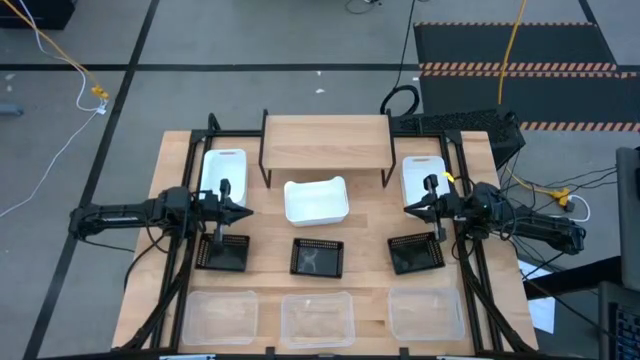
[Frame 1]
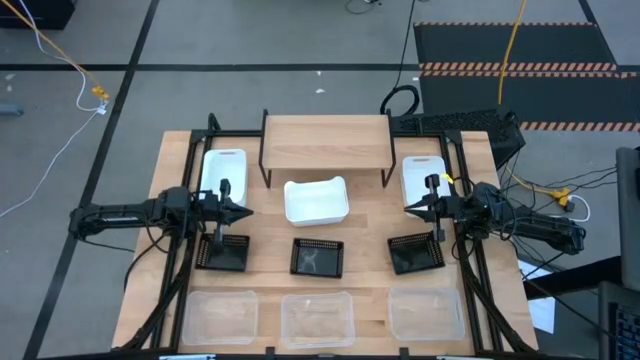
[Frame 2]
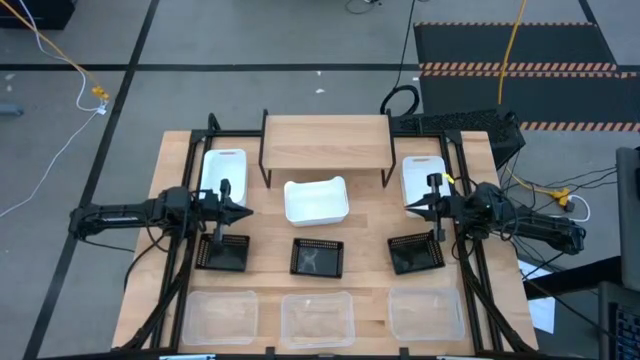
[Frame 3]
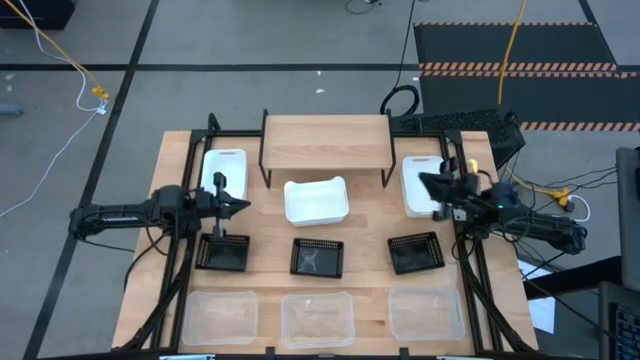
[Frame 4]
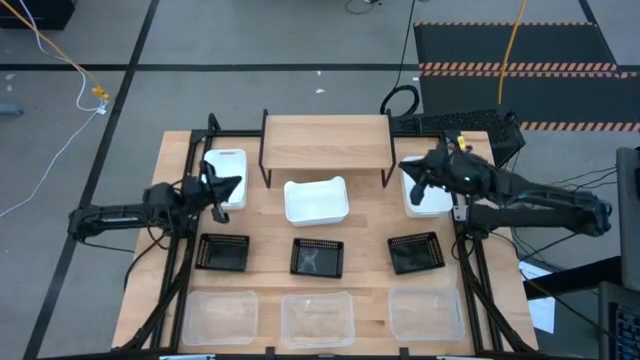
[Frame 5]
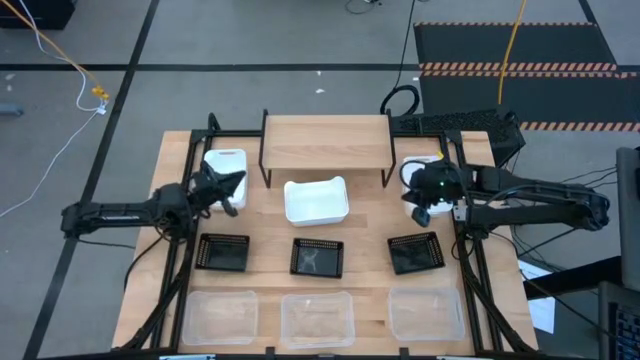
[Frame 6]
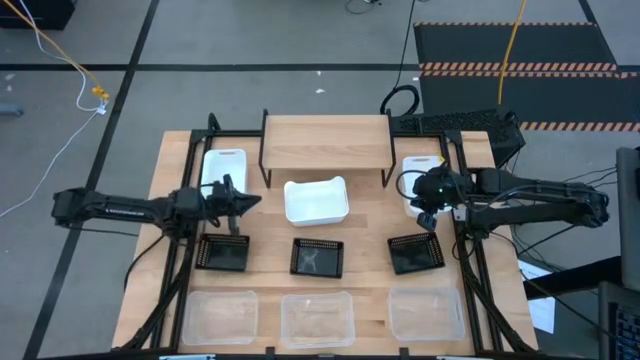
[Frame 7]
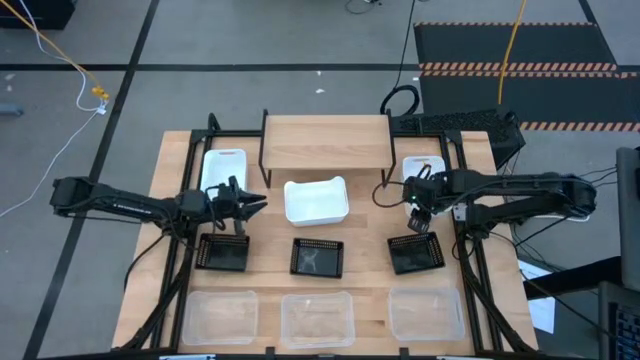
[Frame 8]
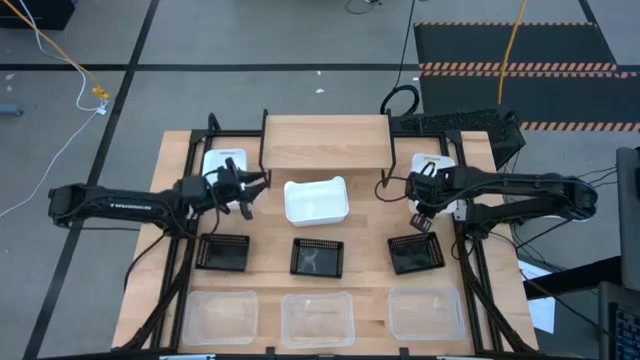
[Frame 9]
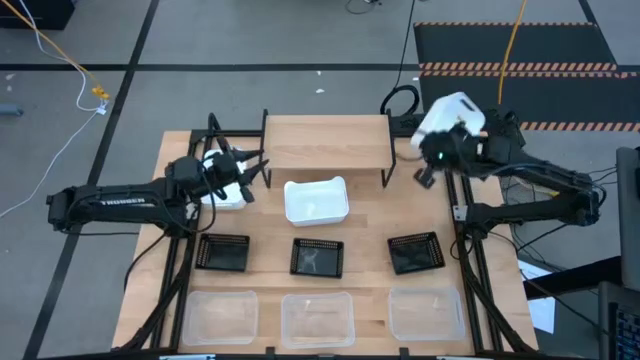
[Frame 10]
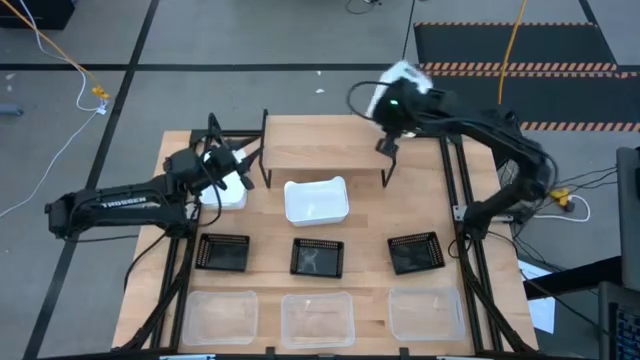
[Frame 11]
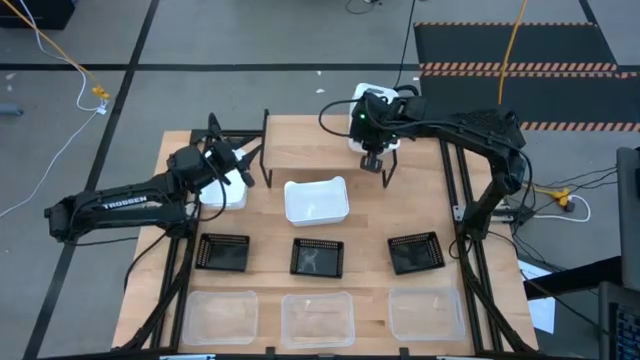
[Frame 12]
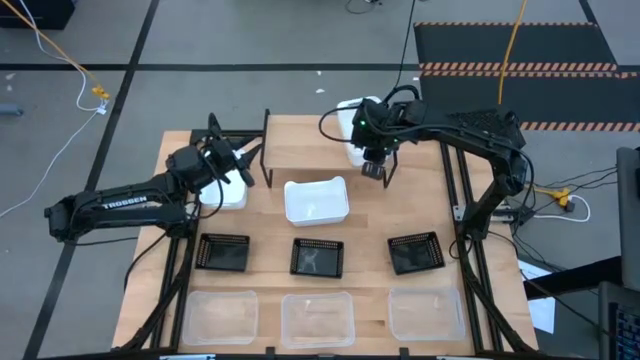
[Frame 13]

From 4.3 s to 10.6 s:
Task: Stack baskets on shelf by color
Put the right white bin on the shelf

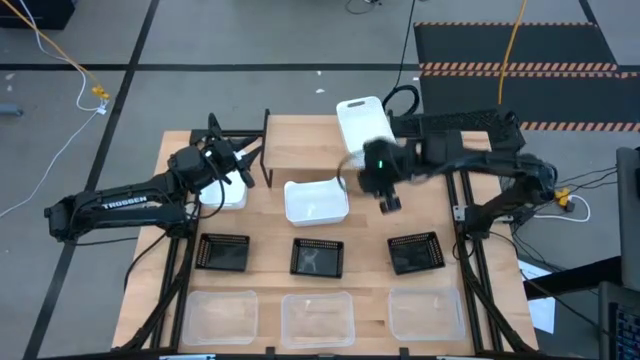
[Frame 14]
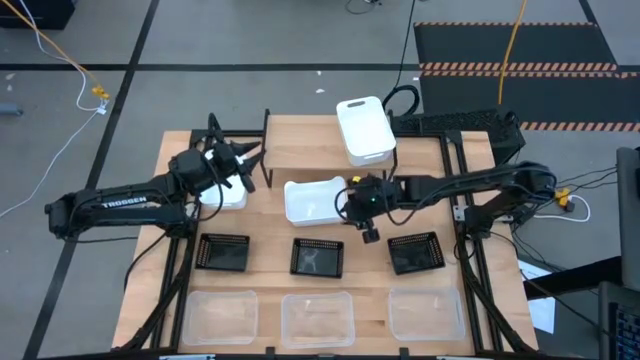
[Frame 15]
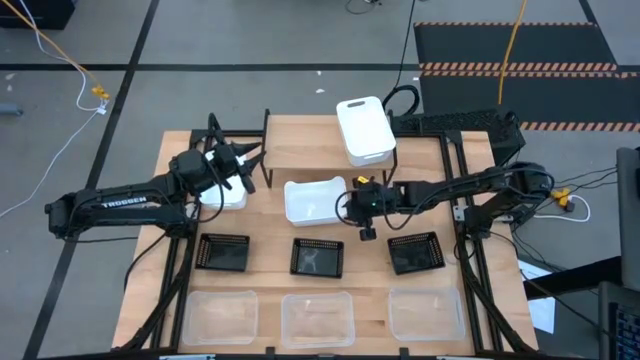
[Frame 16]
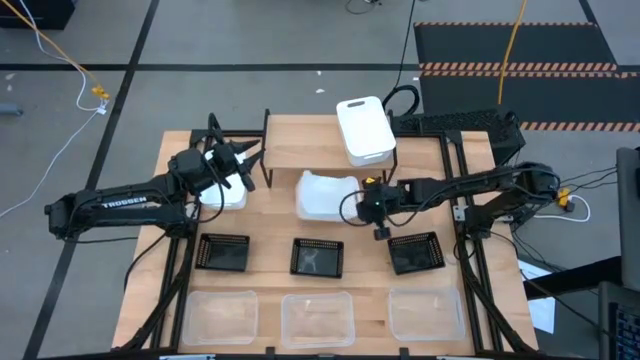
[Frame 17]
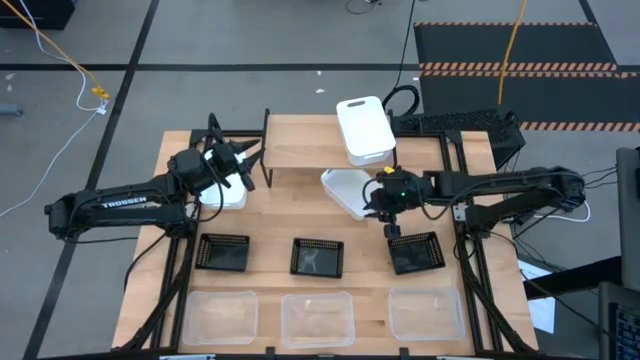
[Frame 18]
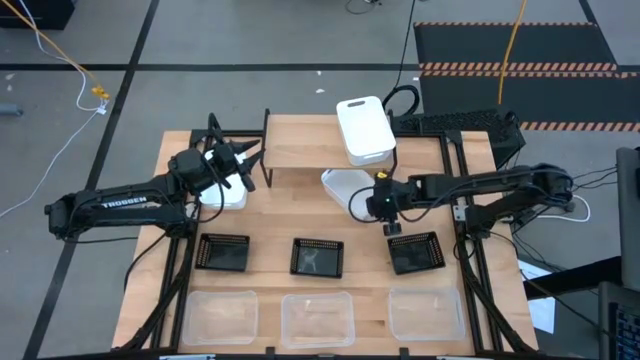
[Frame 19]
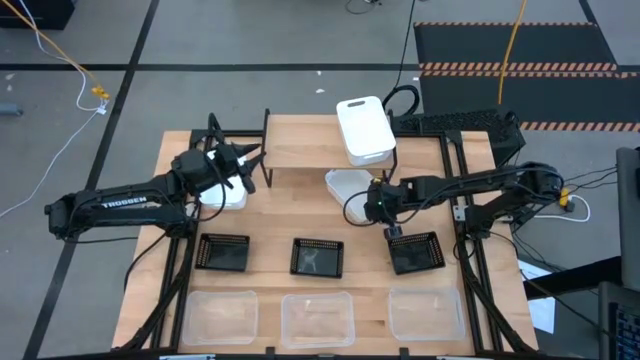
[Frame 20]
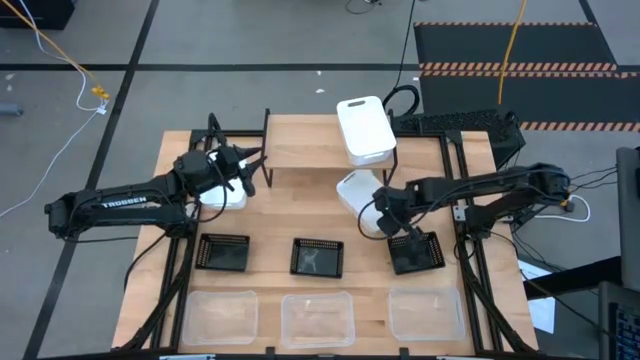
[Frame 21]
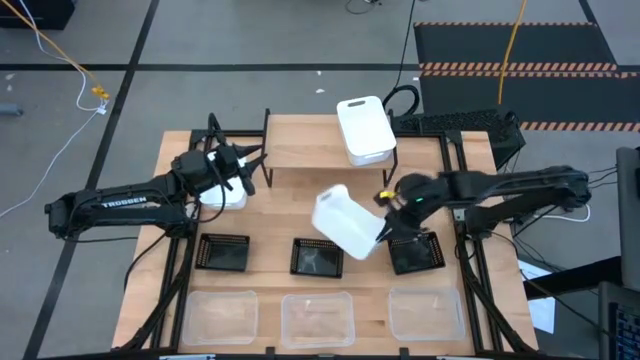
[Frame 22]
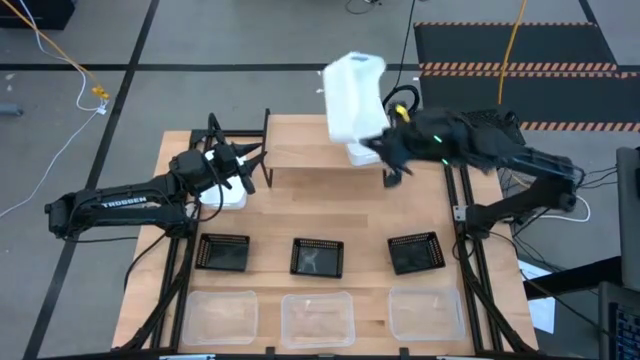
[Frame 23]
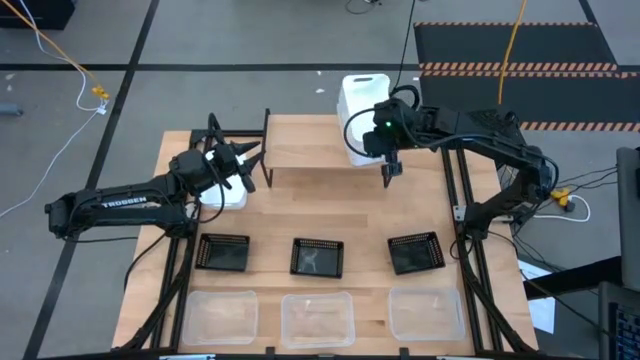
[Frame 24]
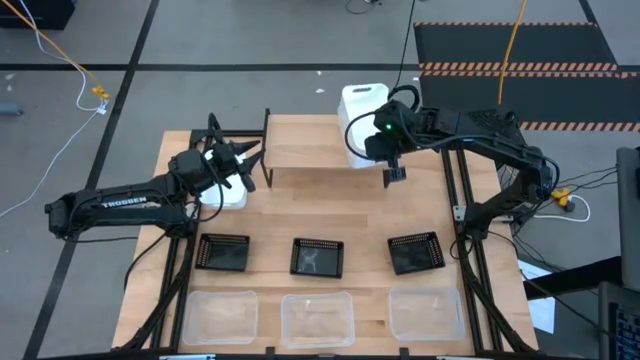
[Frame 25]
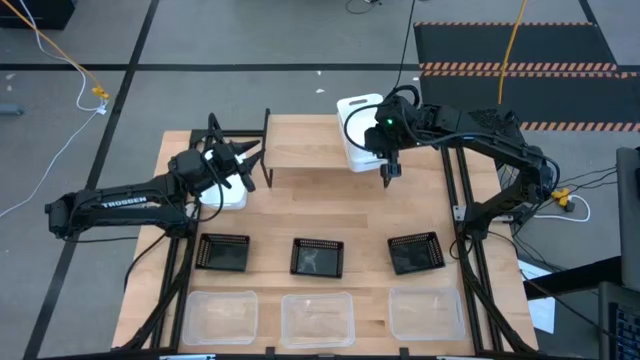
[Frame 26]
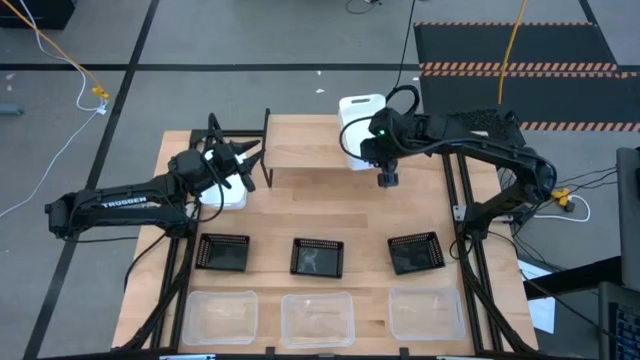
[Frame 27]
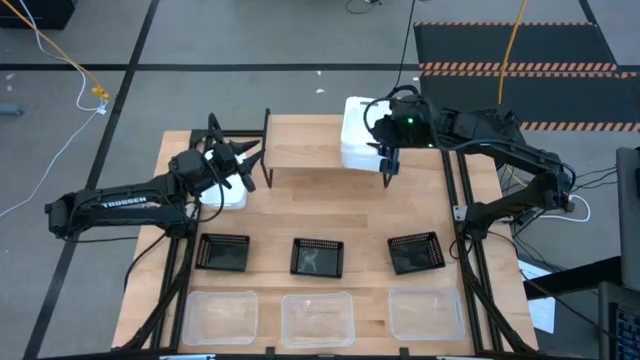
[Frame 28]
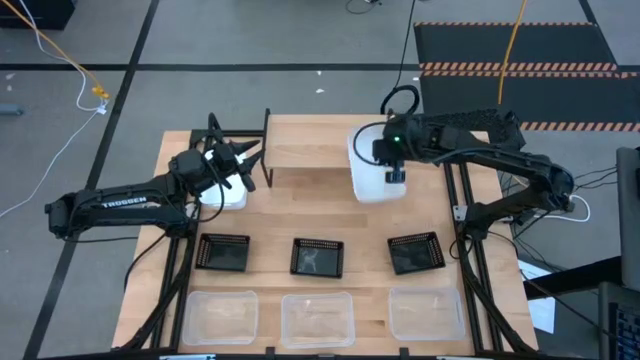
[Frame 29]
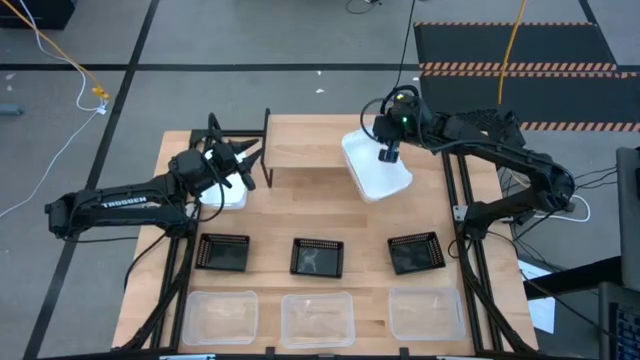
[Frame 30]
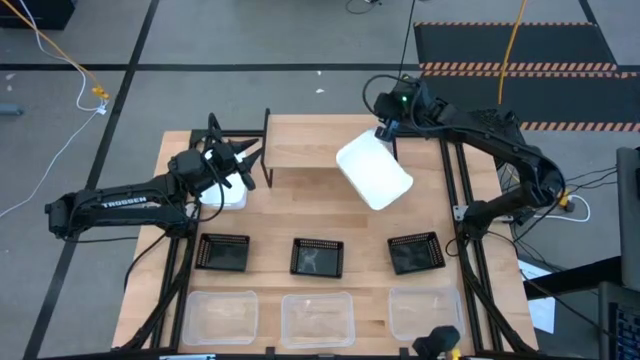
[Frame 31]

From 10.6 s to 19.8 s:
Stack the right white bin on top of the white bin on the shelf

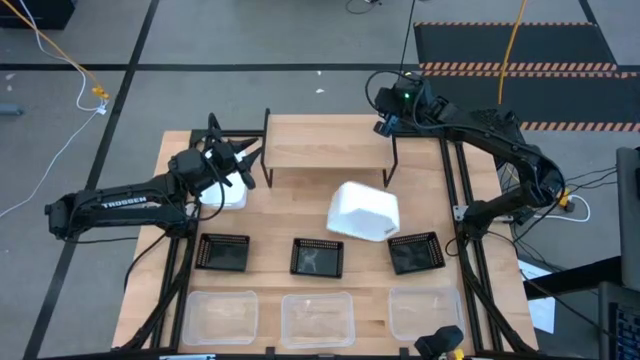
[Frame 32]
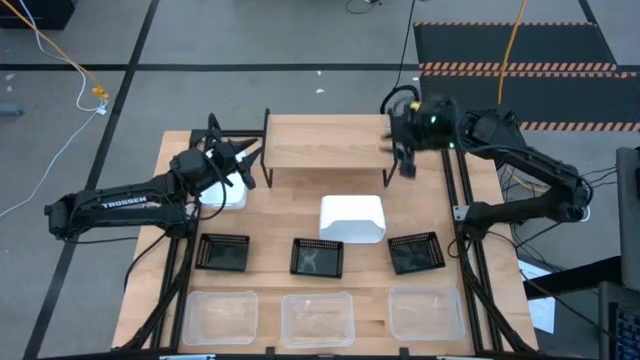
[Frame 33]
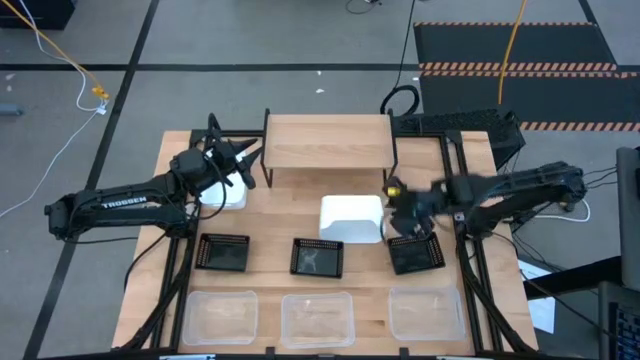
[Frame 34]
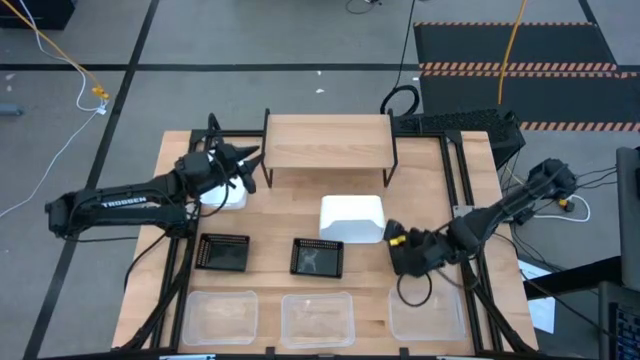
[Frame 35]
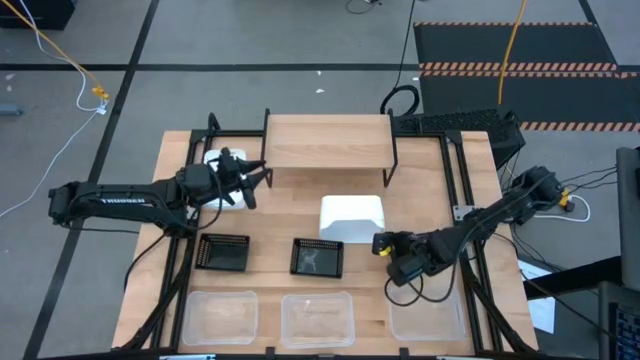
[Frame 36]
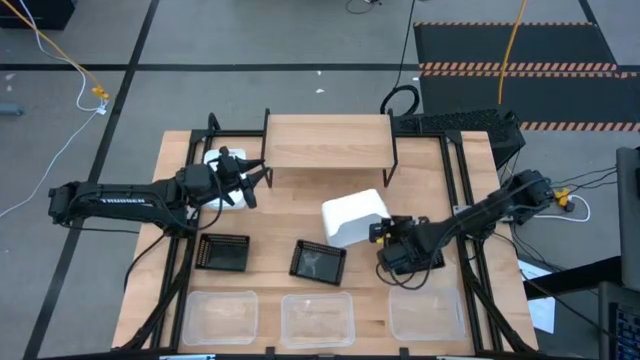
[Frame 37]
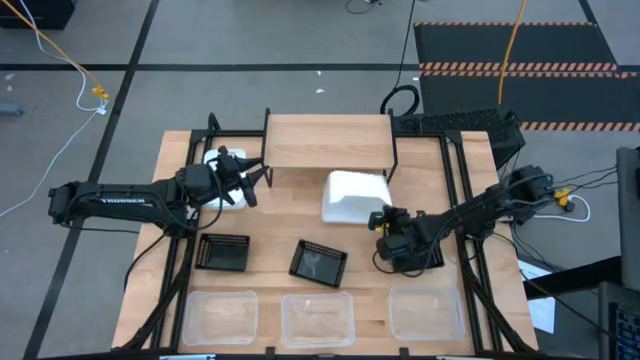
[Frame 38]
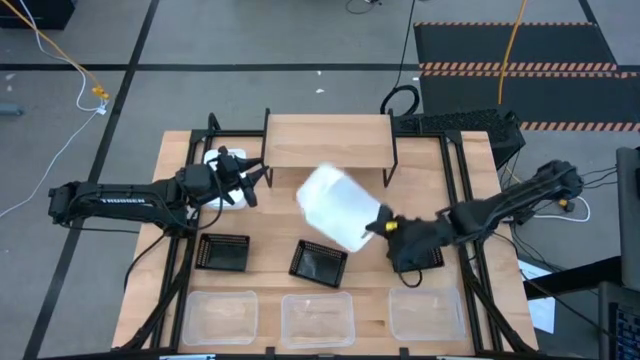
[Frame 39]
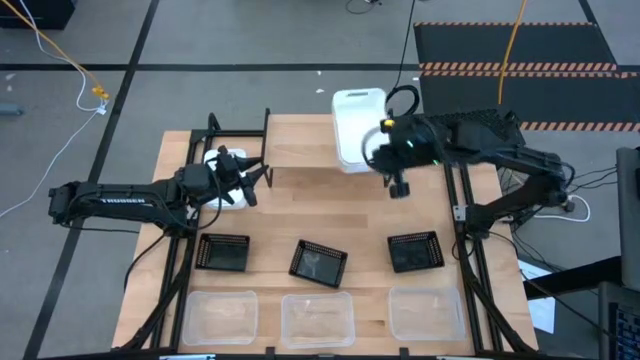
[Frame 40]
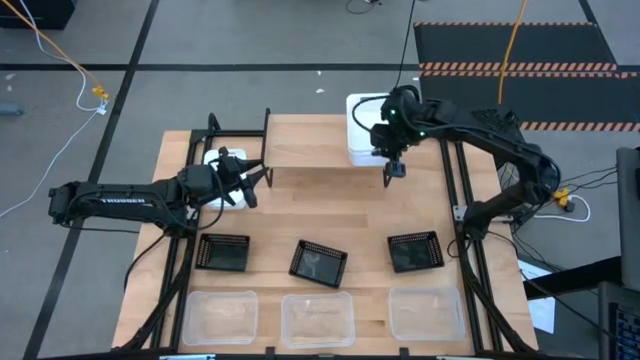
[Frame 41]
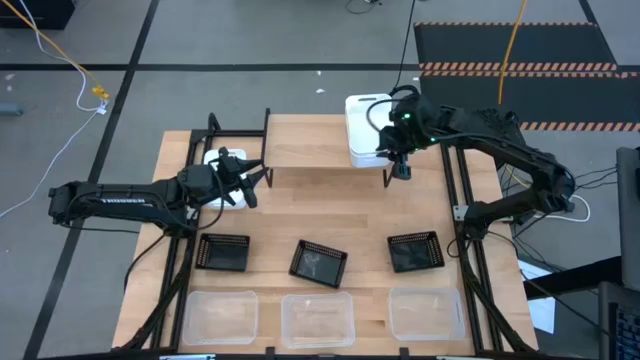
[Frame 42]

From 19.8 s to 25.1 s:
Put the stacked white bin on the shelf

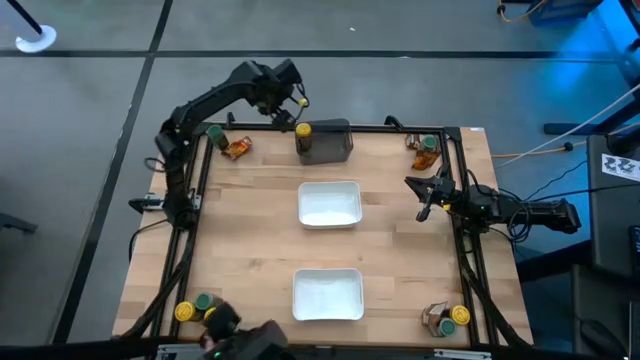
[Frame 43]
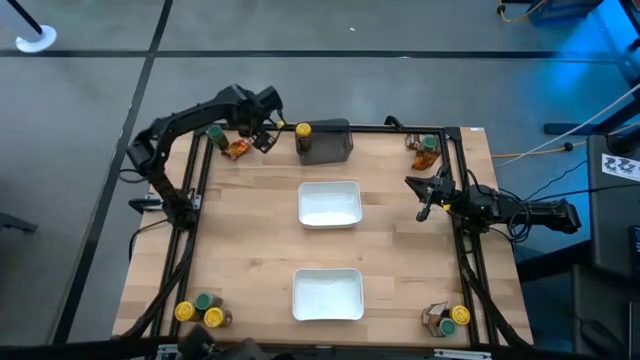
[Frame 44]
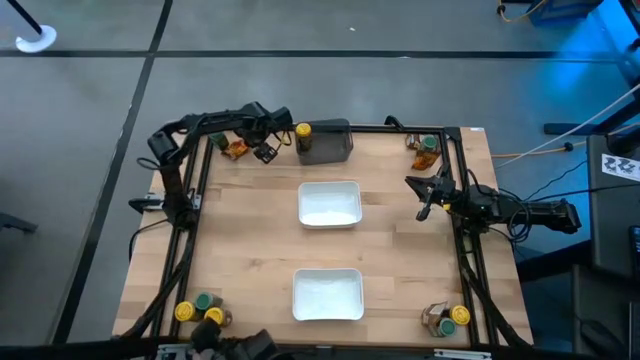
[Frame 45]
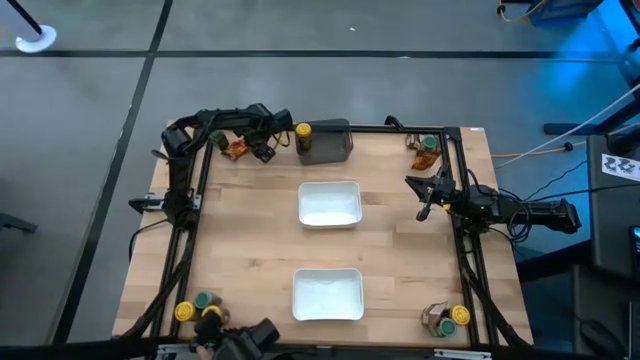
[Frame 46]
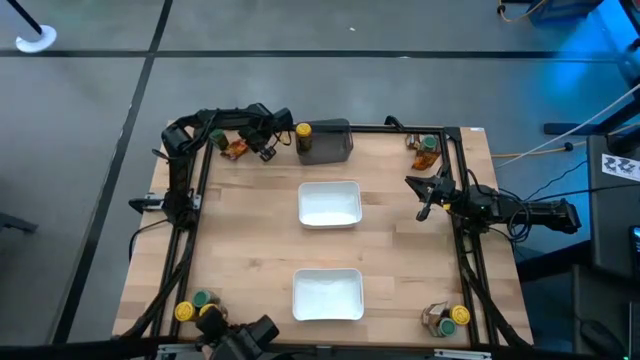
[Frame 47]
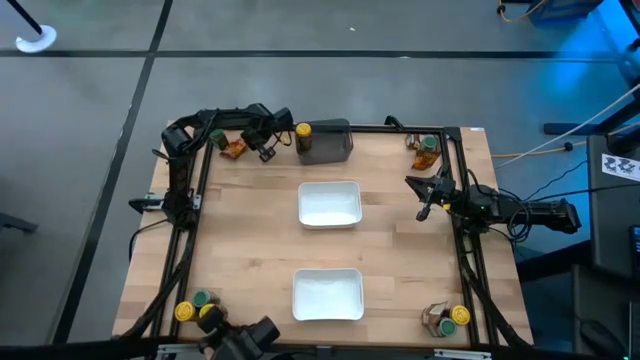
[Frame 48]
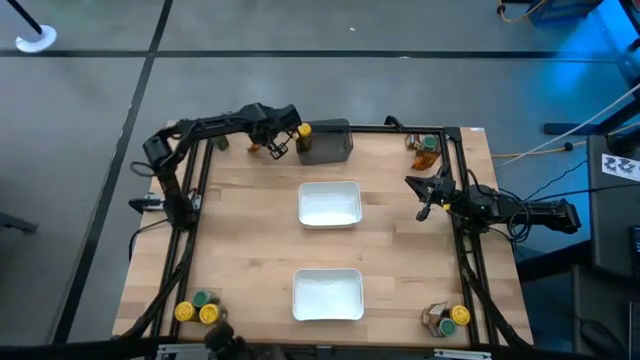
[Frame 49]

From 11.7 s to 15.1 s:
Task: Sort spices by type
Put the orange seasoning bag into the white bin
